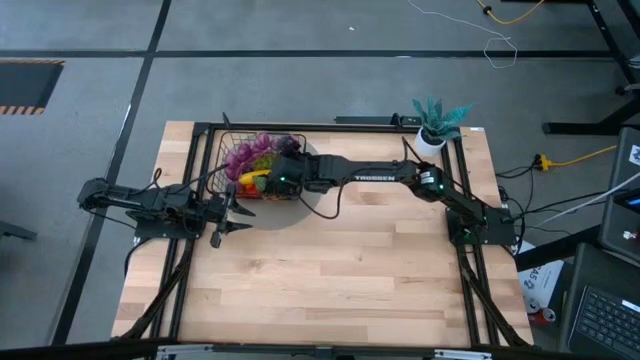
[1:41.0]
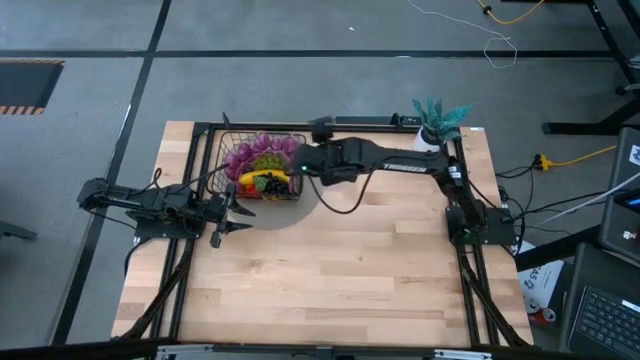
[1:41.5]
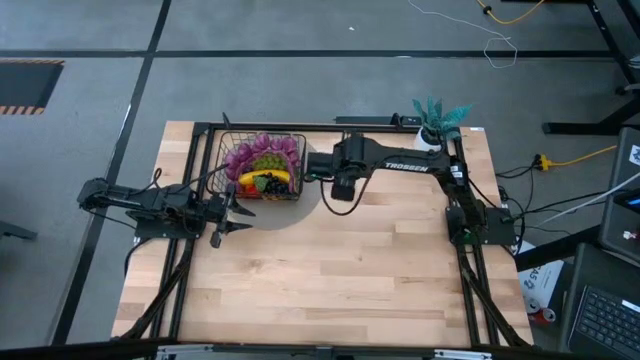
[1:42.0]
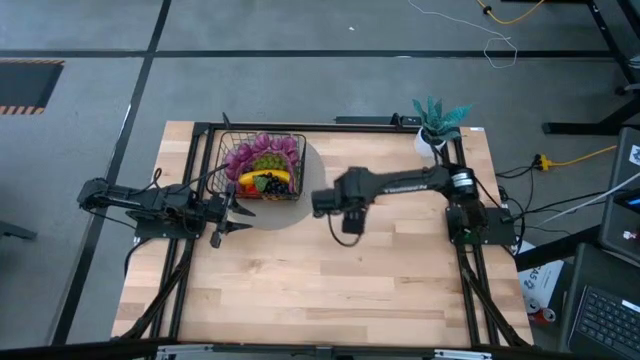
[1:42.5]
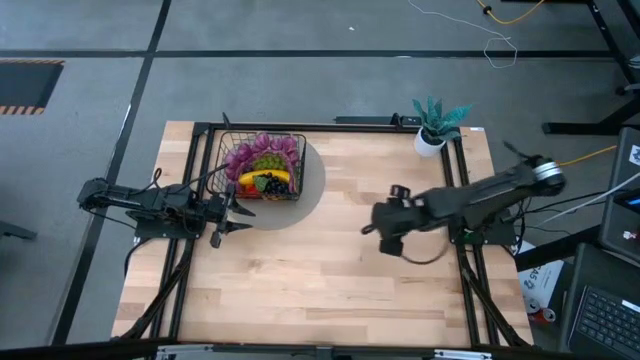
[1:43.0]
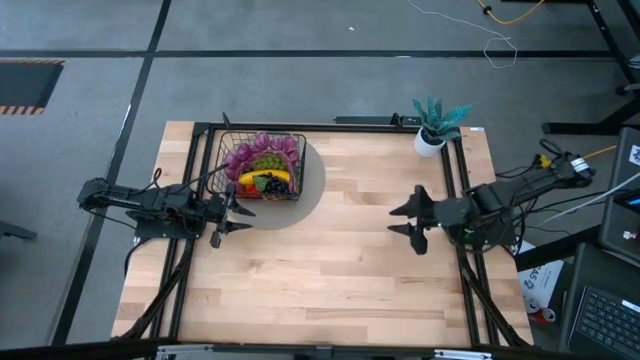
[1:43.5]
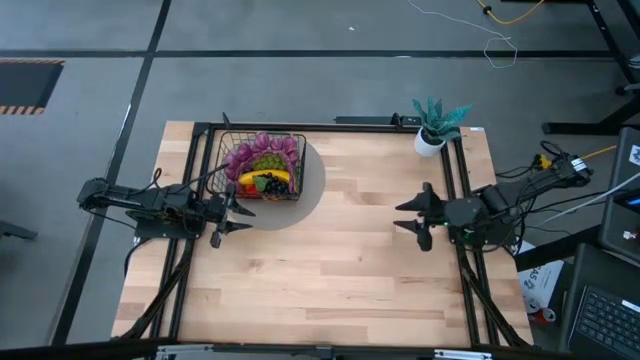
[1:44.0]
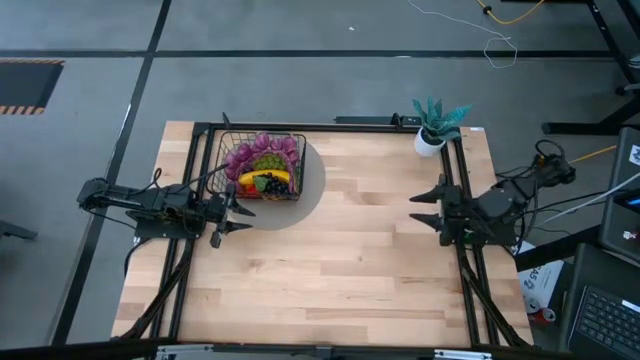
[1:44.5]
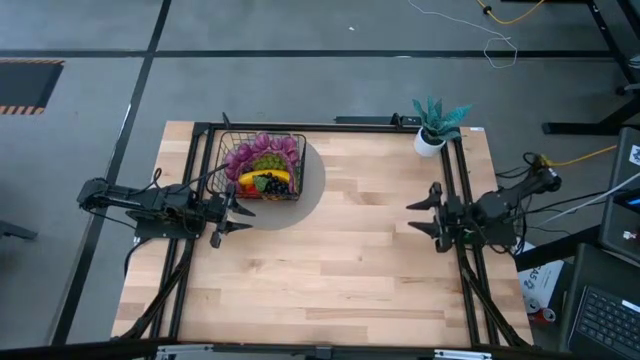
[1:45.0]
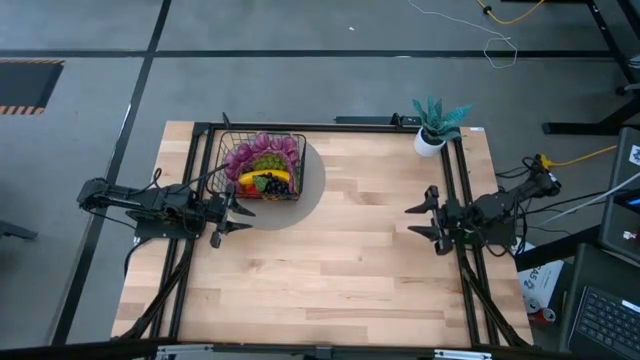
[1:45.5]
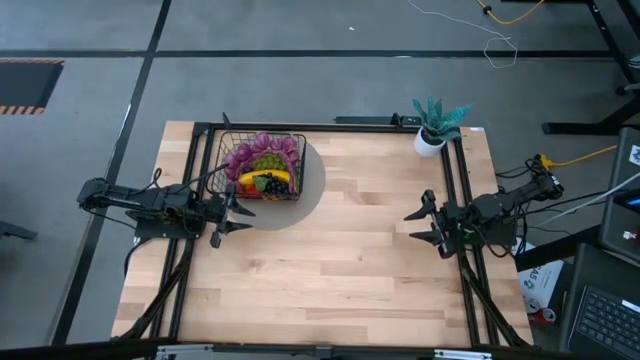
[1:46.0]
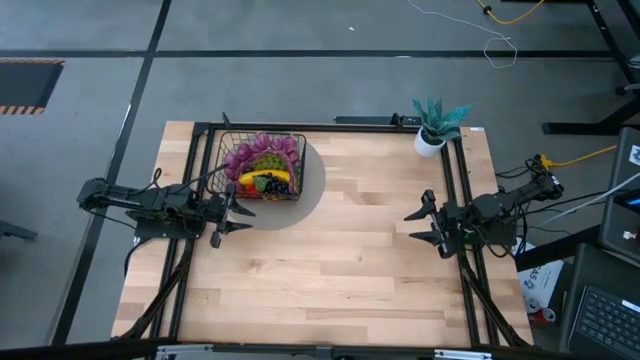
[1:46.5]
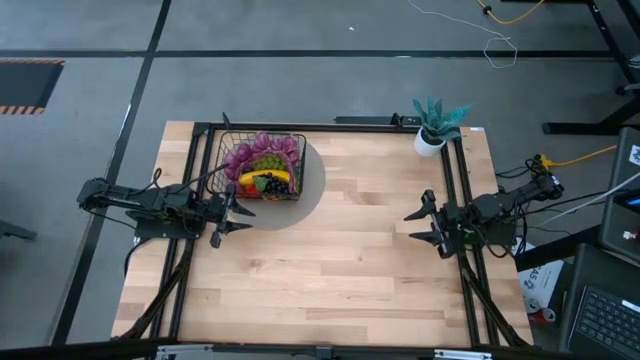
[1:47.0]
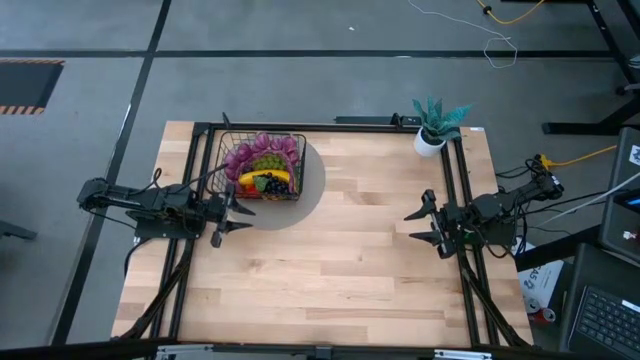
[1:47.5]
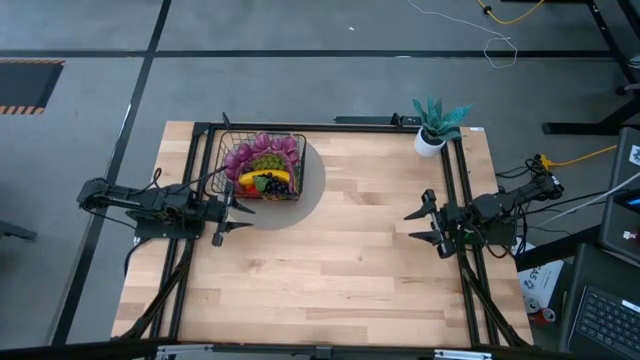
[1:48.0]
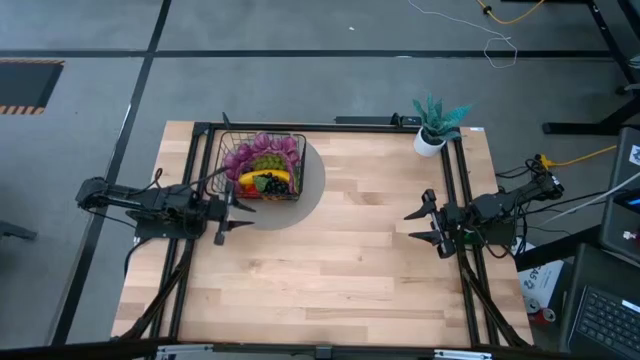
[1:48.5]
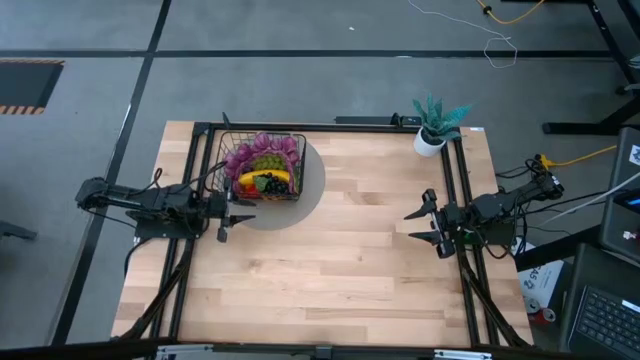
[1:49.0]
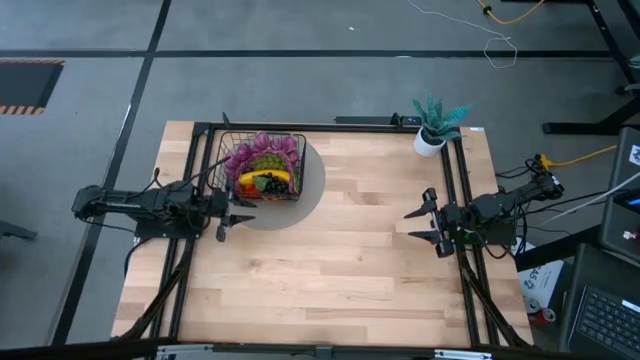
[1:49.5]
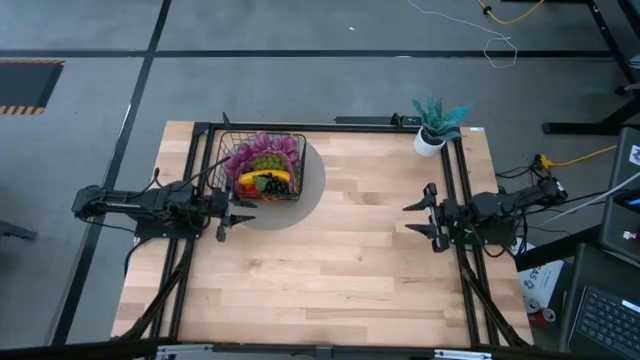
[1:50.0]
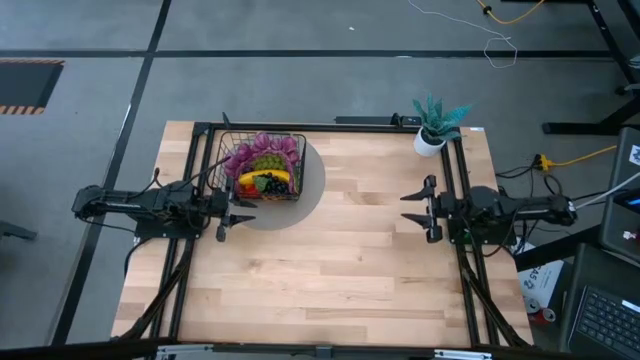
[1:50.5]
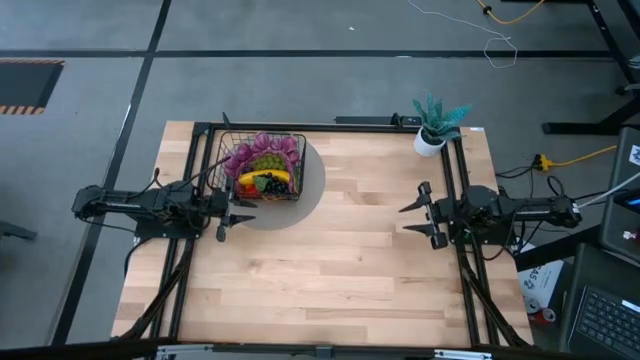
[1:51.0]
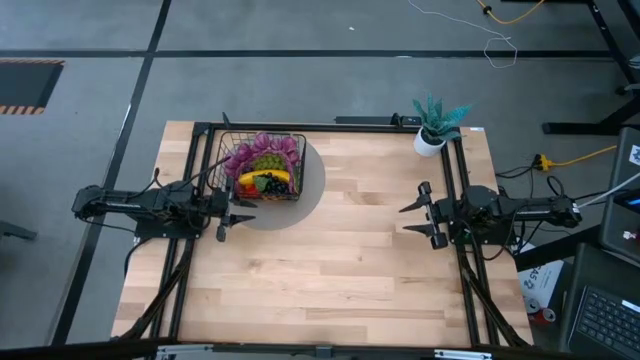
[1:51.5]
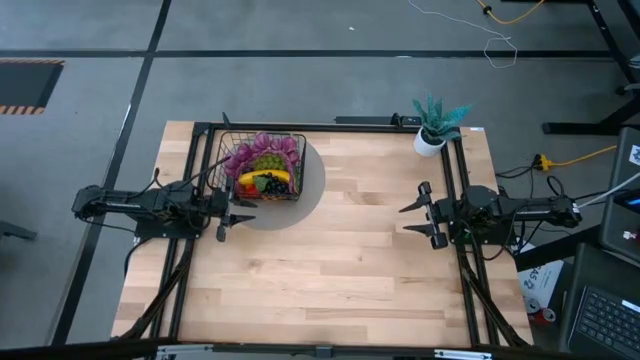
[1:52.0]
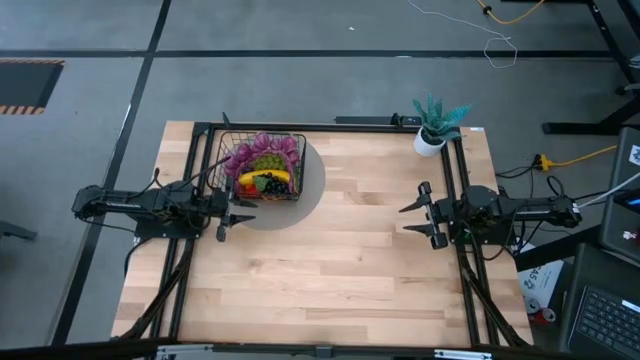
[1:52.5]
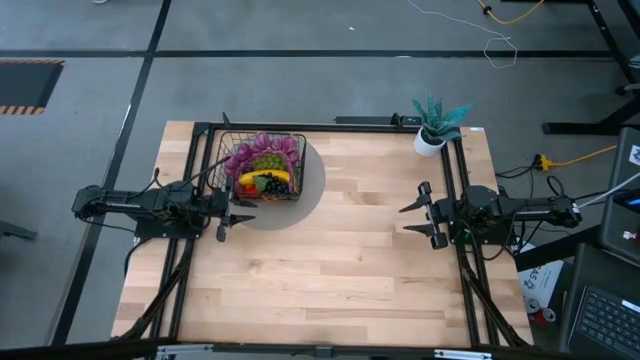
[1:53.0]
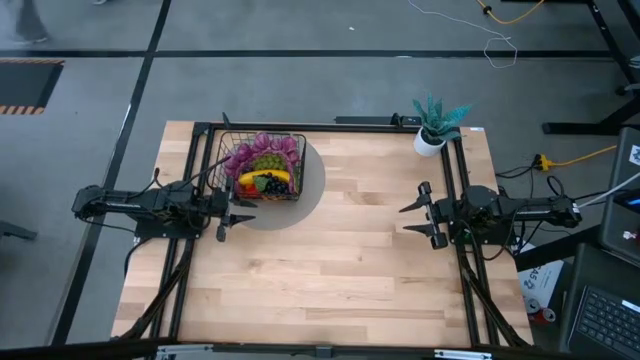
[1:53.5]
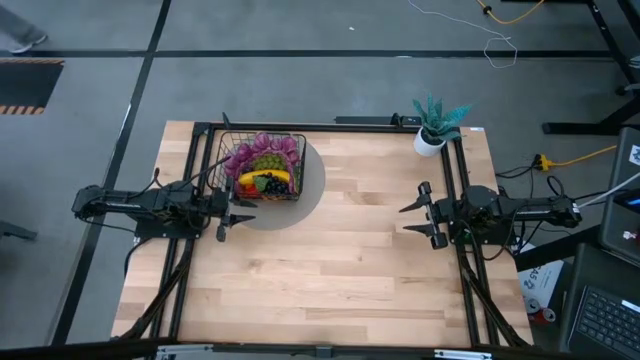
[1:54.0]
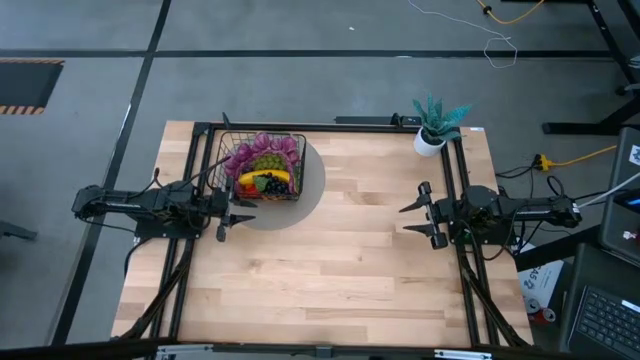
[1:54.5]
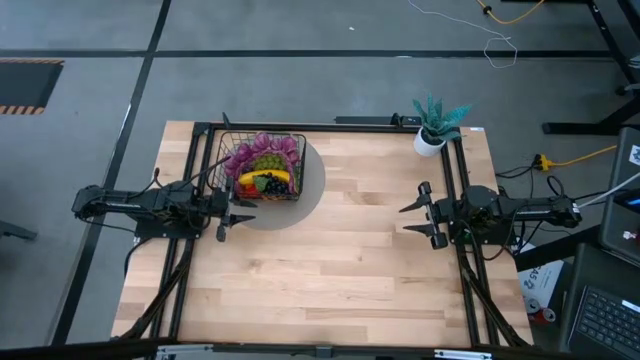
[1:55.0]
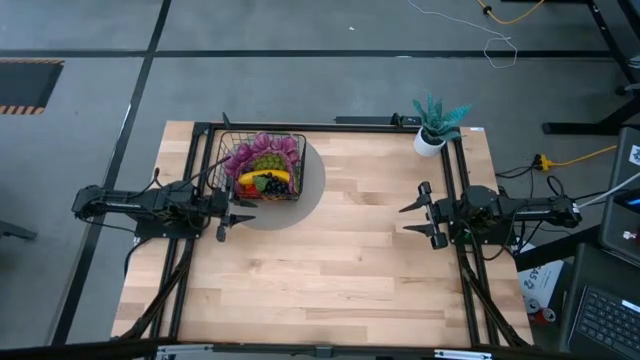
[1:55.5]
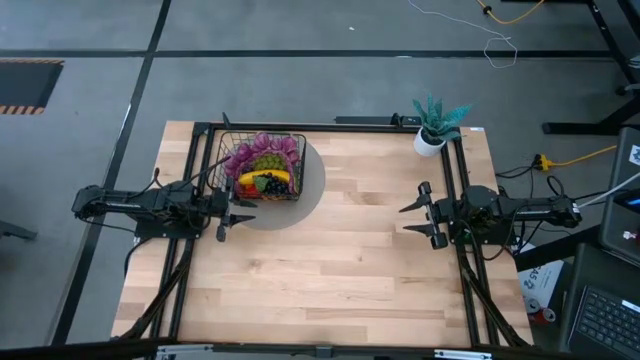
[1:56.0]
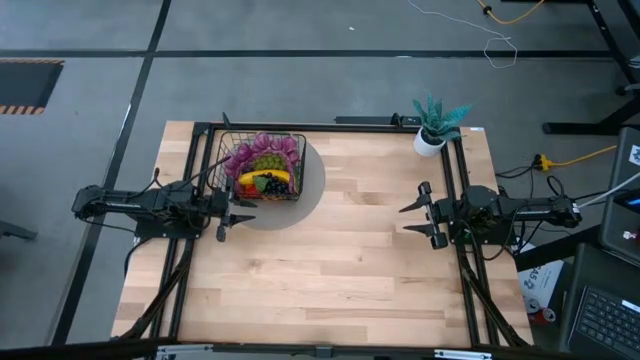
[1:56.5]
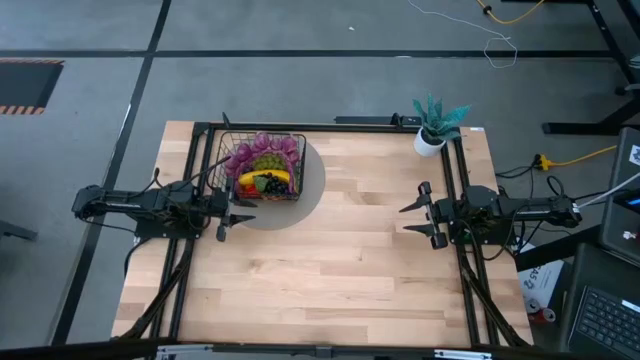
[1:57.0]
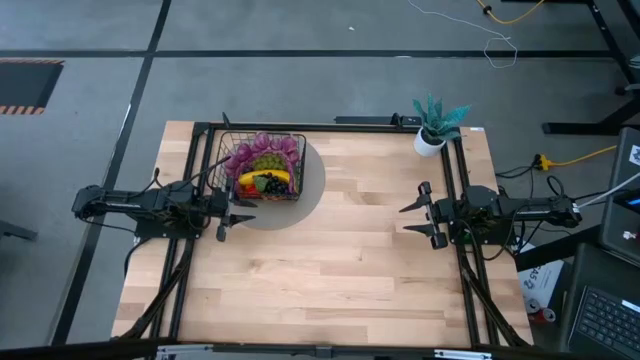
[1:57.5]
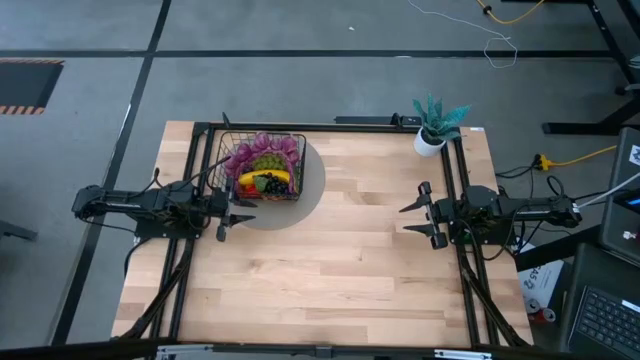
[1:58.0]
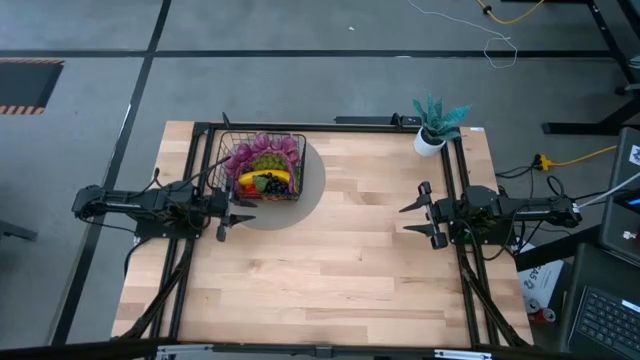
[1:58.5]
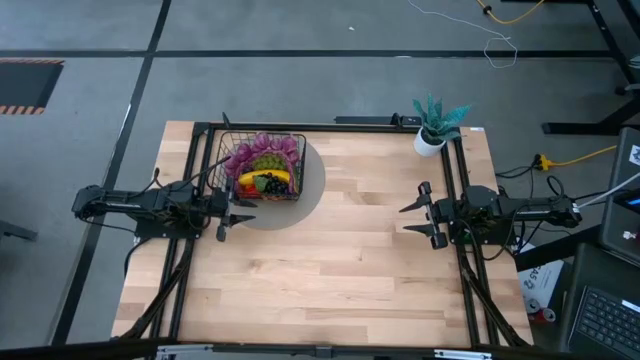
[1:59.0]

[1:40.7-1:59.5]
Task: Build produce basket
Return to Home Position

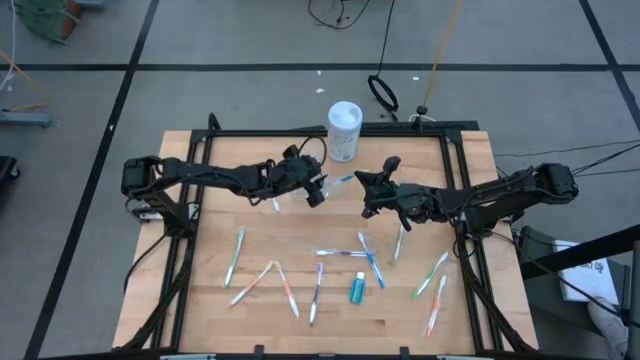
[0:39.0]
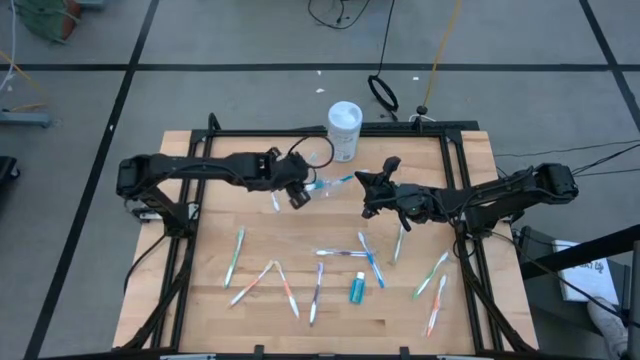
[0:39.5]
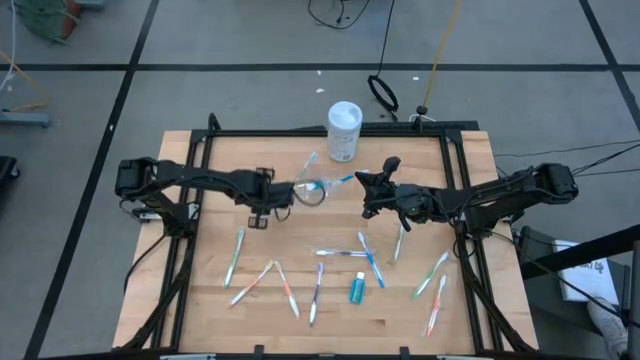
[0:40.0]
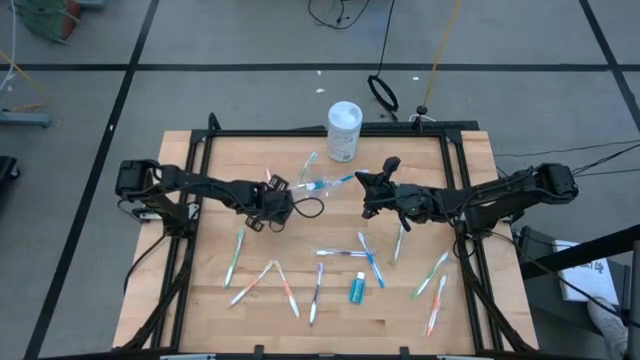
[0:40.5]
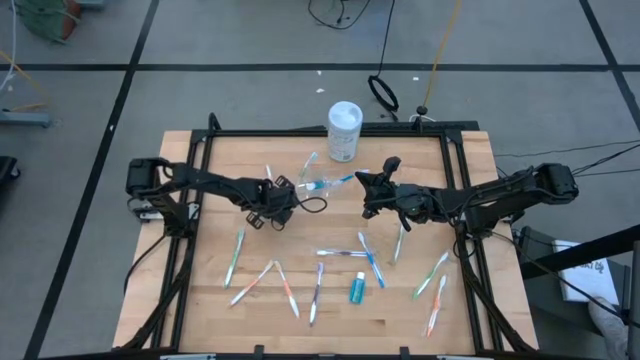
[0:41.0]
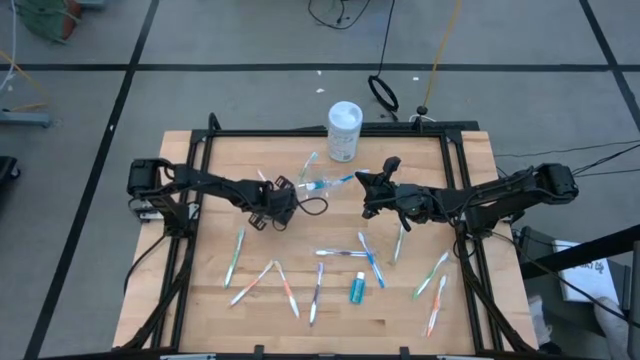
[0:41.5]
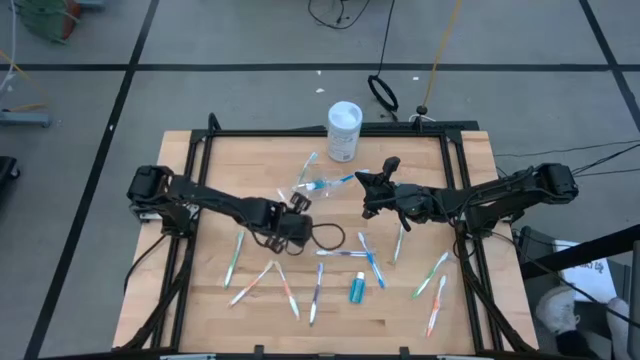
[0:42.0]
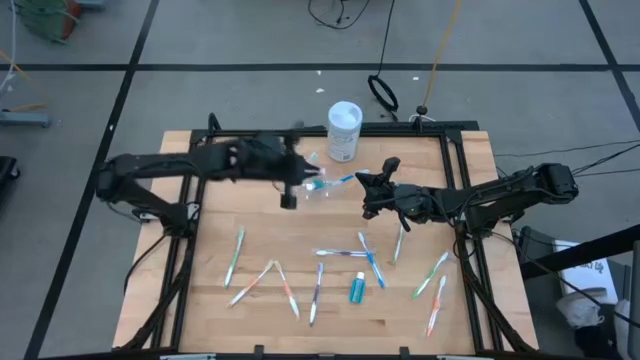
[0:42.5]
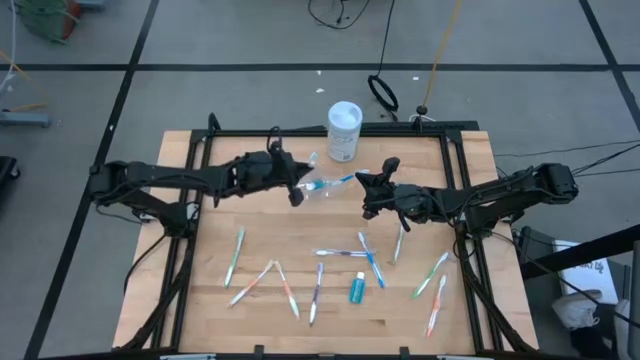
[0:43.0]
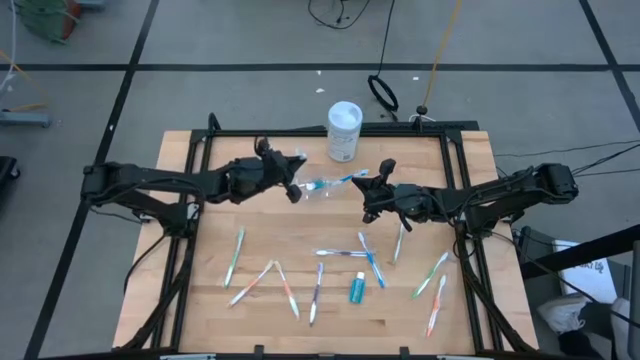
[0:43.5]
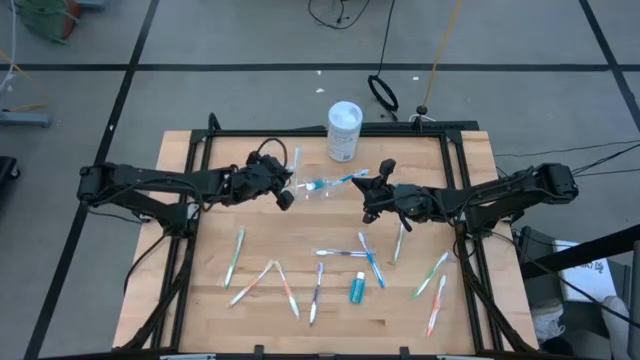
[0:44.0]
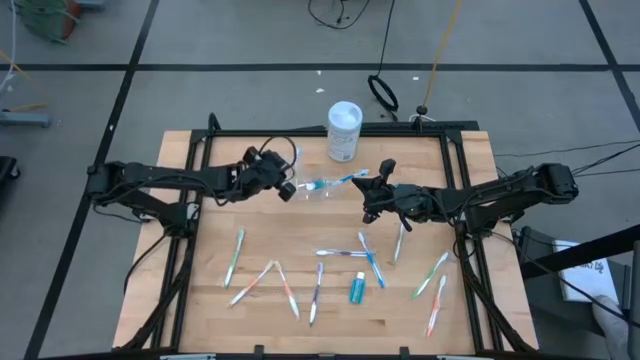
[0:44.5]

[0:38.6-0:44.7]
Task: Pick & Place toothbrushing station
Put the orange toothbrush into the transparent organizer
